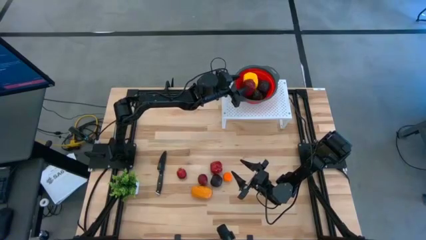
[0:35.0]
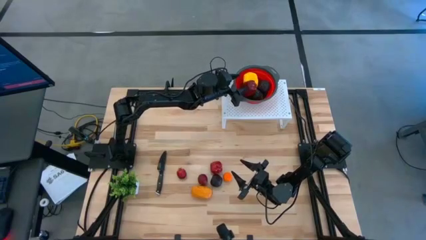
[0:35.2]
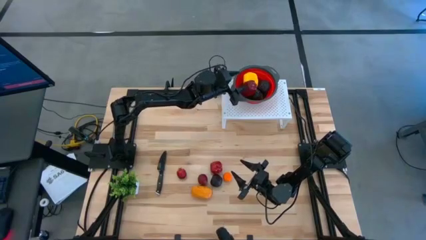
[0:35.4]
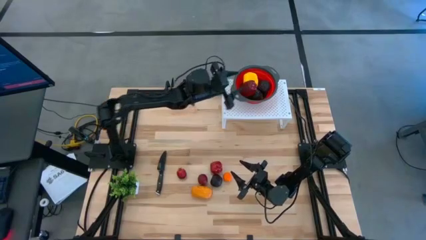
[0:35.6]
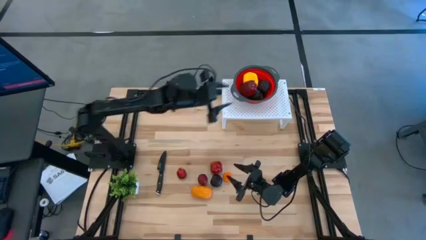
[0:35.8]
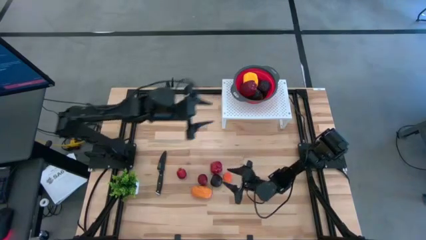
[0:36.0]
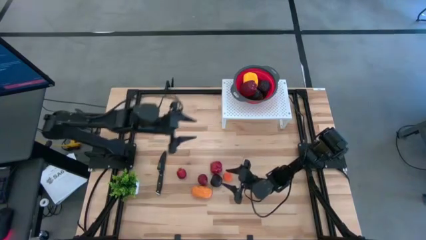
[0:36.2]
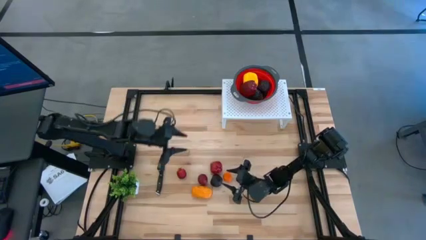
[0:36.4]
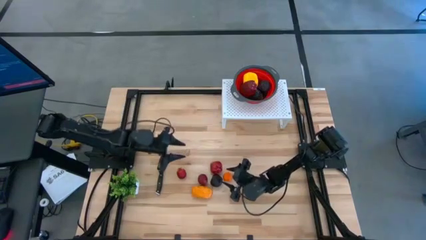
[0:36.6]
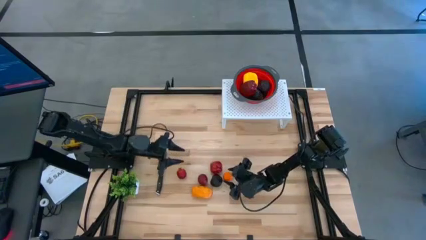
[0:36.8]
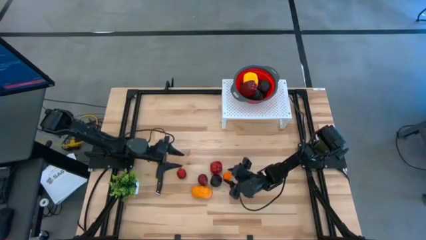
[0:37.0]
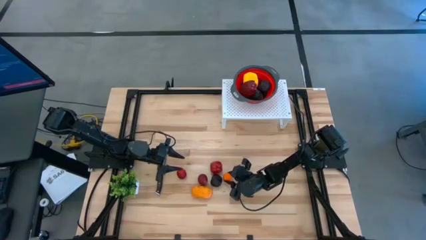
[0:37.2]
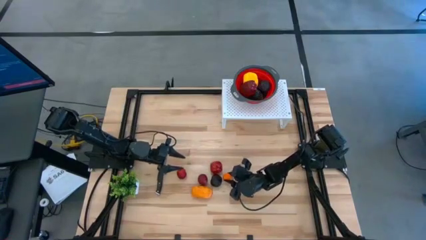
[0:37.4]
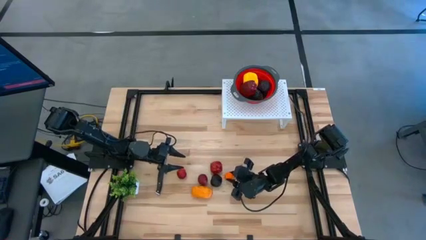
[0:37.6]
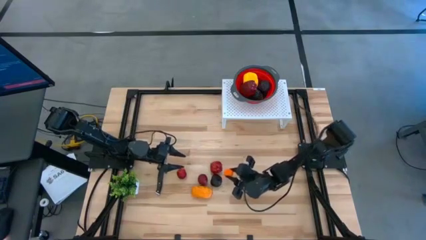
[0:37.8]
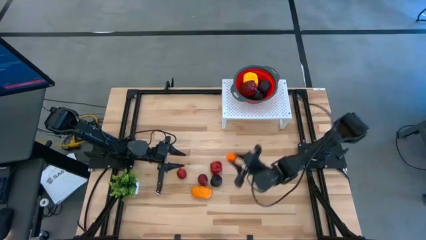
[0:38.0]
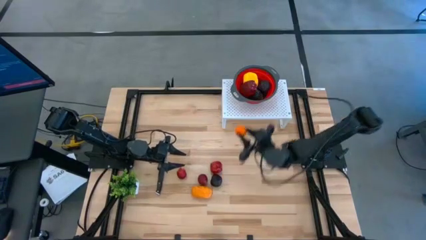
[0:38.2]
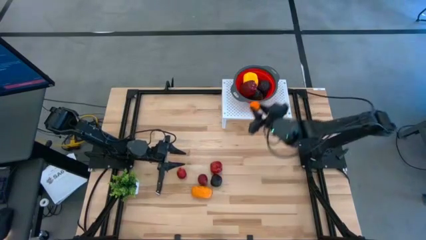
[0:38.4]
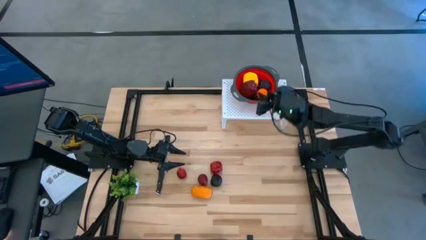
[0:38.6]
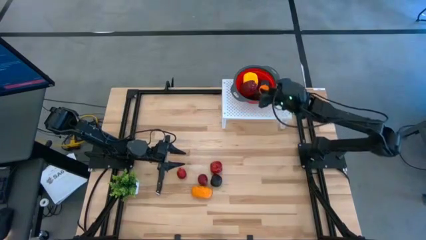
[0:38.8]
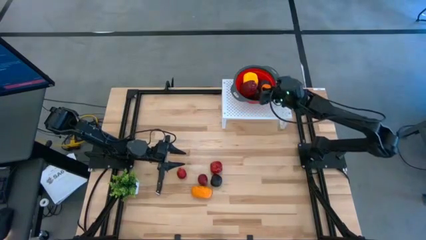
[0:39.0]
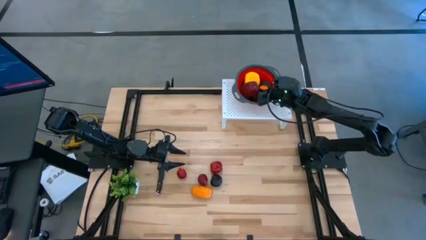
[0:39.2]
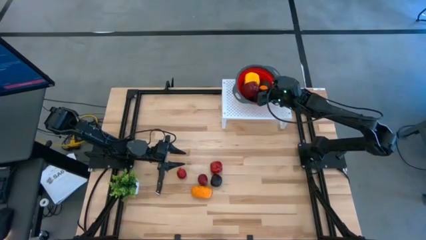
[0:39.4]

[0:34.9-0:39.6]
Task: Pick & Place Fruit
Put the orange into the orange strainer bowl on the shelf

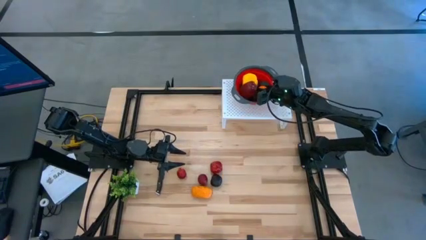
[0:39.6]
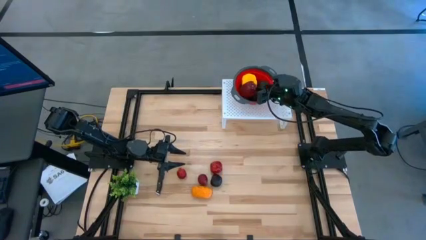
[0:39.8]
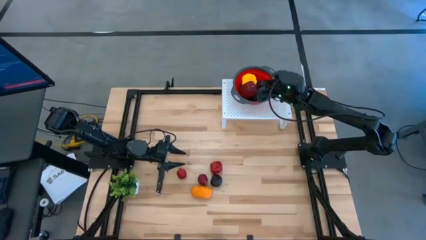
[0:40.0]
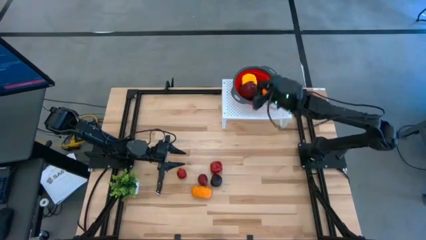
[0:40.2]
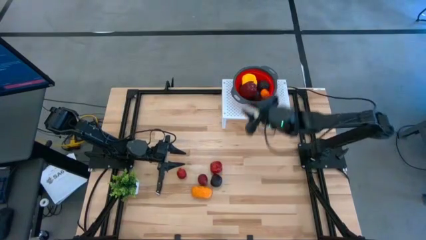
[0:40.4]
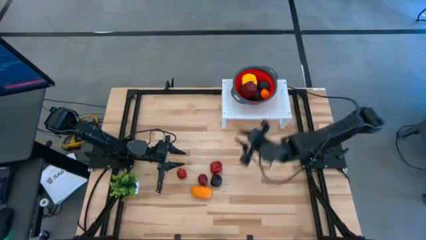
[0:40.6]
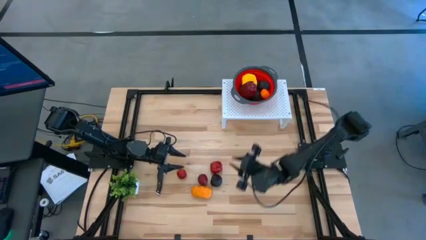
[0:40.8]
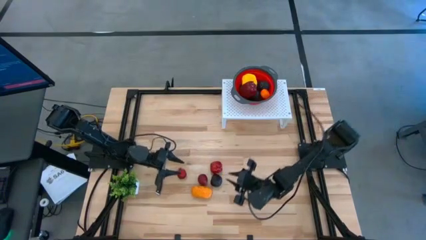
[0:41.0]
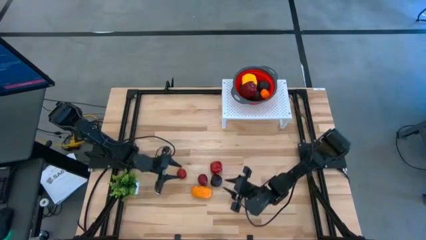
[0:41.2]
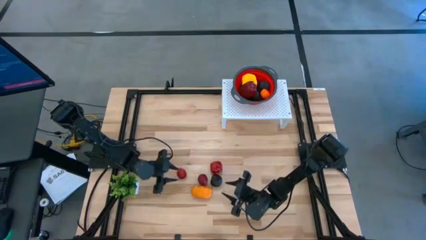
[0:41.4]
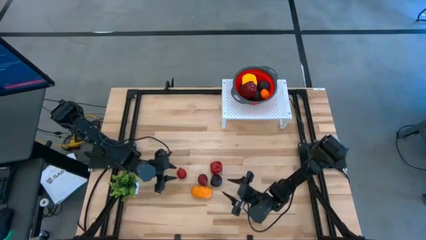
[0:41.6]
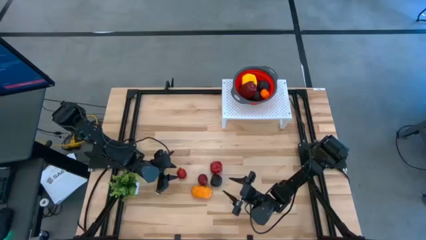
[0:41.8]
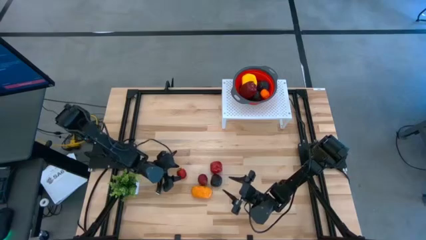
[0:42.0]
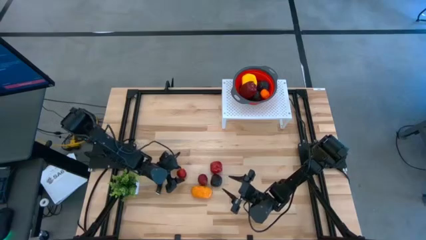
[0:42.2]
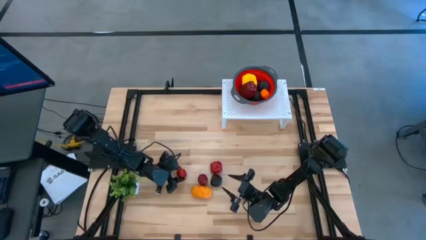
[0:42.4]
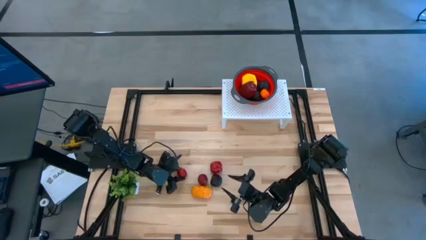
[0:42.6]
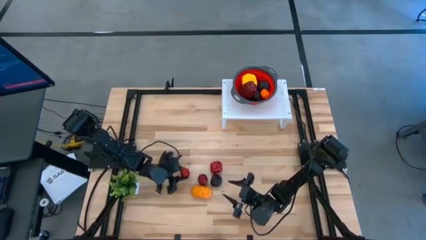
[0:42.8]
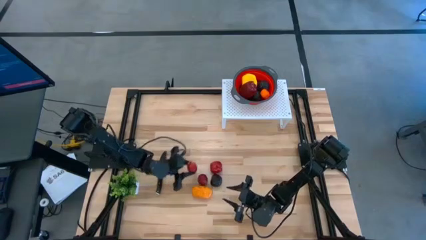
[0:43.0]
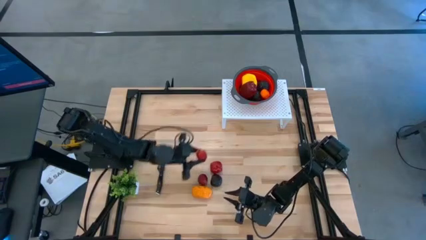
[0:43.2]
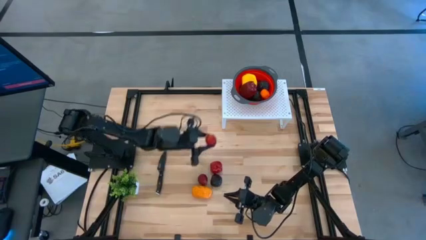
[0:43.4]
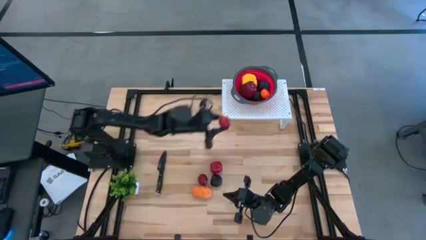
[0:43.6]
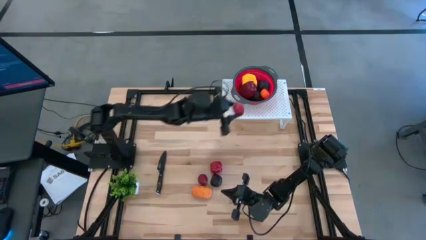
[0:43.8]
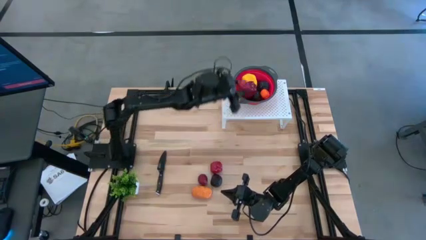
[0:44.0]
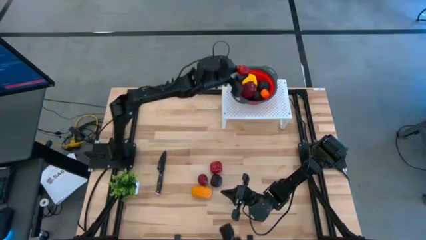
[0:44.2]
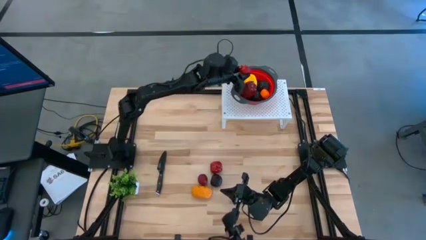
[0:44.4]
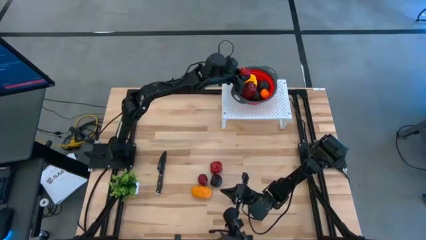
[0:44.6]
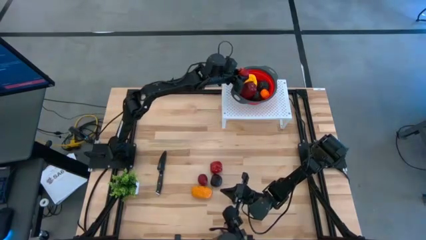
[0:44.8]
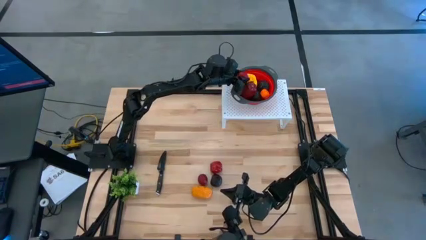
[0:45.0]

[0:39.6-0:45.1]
Put the left red pomegranate into the orange strainer bowl on the shelf

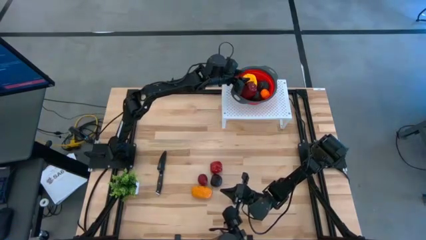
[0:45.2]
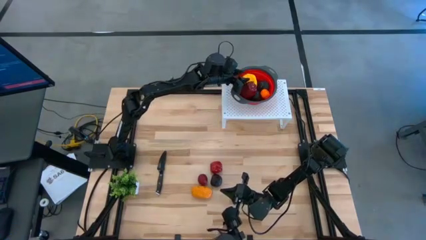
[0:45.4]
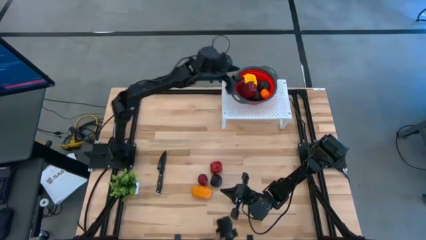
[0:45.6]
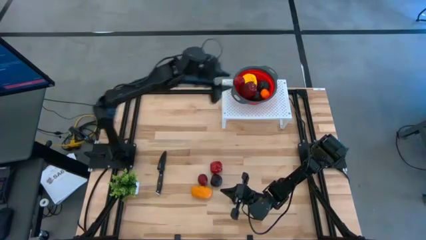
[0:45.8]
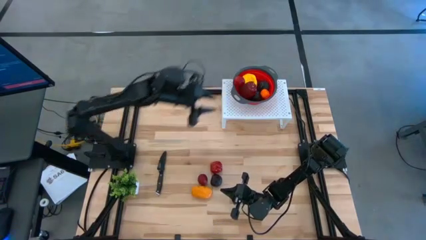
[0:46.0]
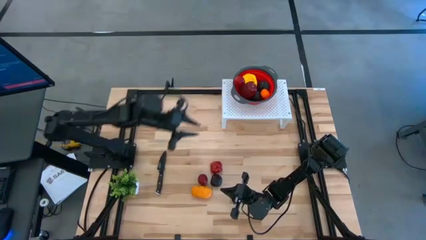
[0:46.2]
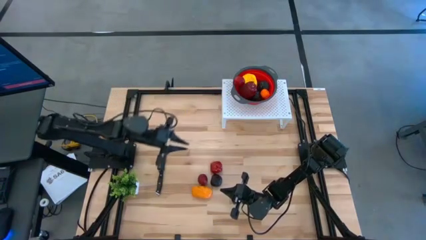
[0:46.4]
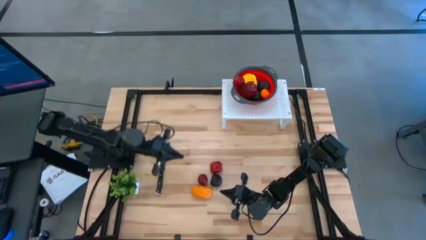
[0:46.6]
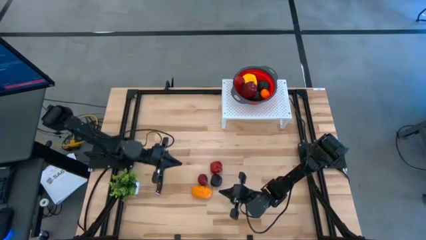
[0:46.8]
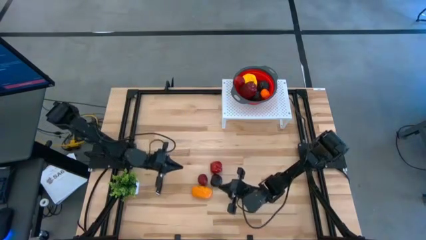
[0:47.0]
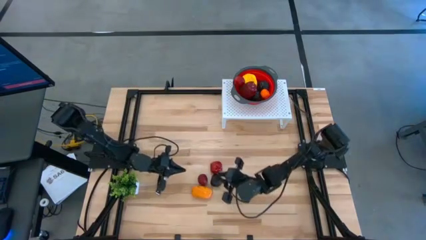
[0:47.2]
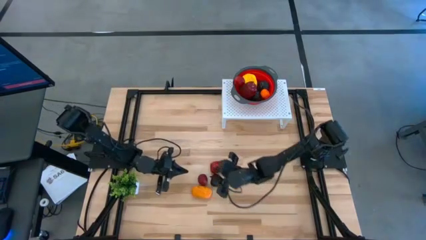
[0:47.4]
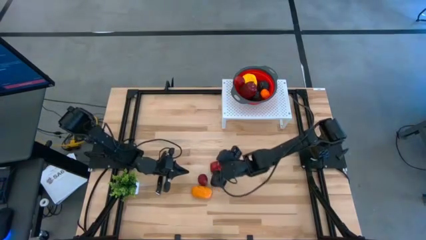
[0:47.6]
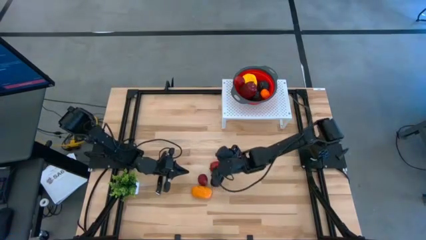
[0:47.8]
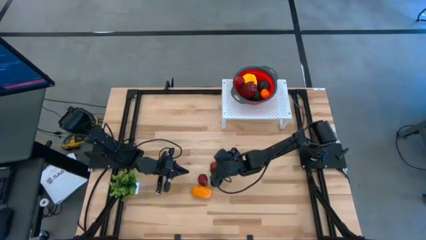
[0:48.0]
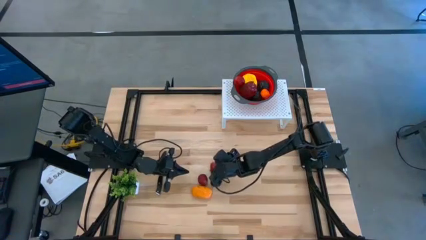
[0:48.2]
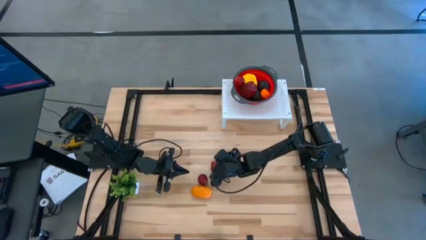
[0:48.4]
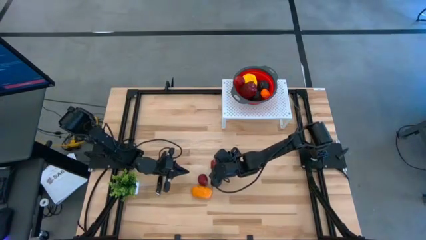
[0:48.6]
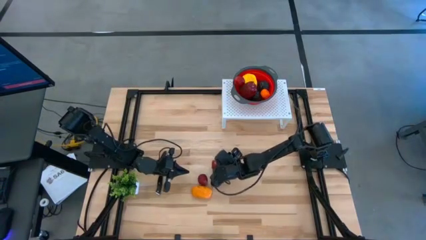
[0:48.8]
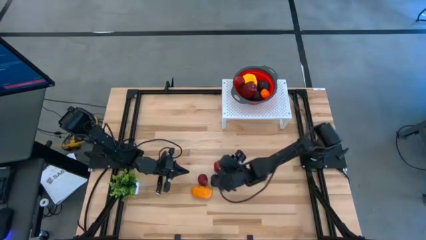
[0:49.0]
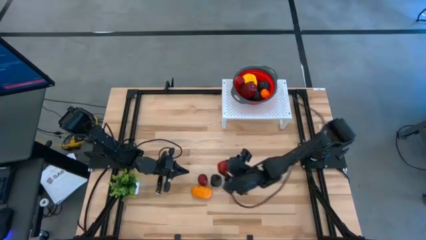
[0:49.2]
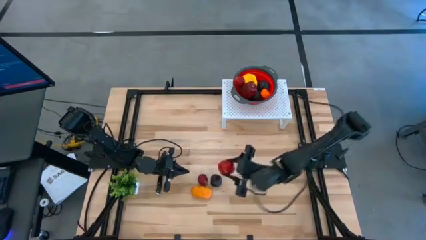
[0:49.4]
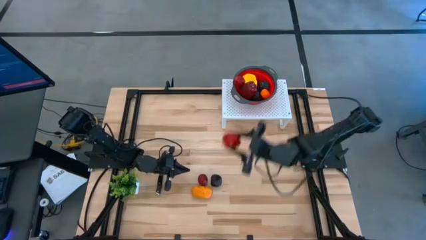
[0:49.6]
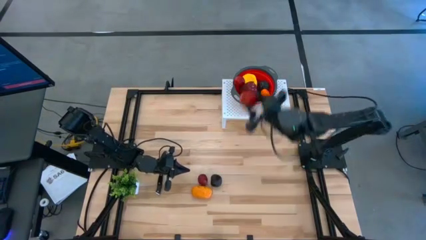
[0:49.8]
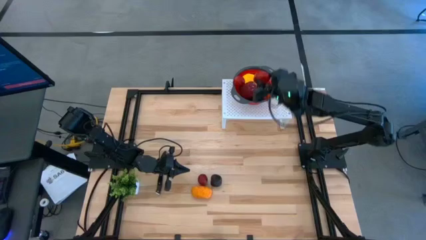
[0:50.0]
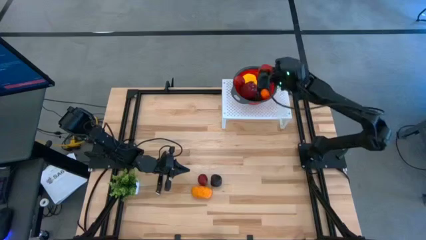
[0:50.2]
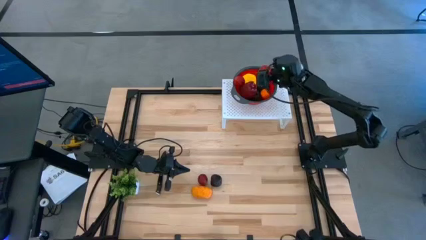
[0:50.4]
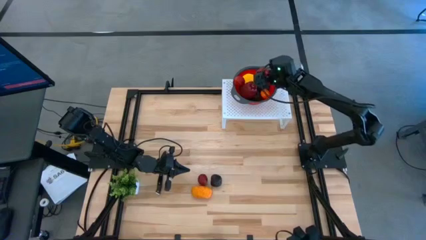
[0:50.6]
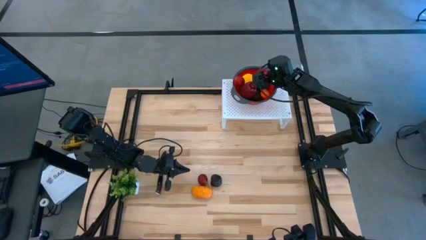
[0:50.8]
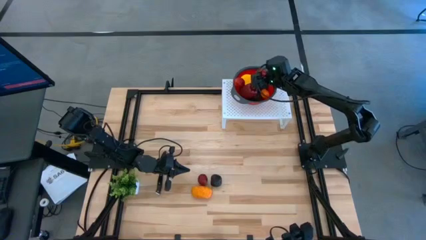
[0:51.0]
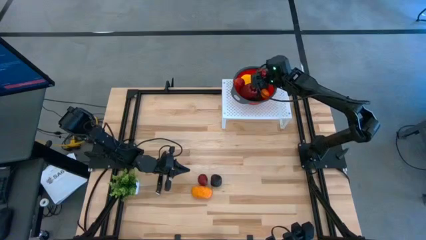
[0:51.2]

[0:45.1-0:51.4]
Put the red apple into the orange strainer bowl on the shelf

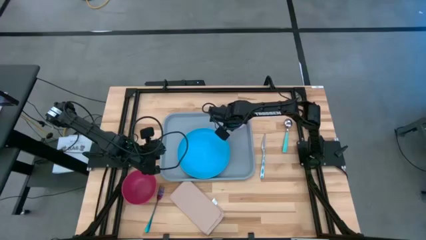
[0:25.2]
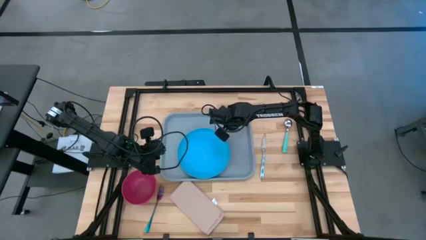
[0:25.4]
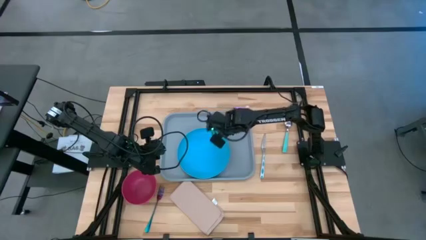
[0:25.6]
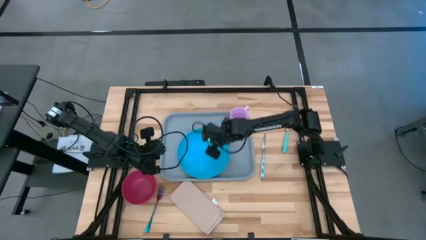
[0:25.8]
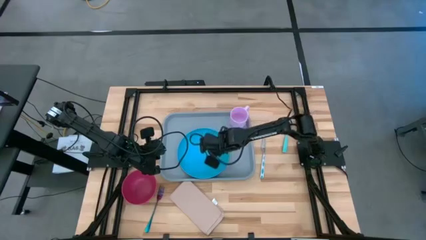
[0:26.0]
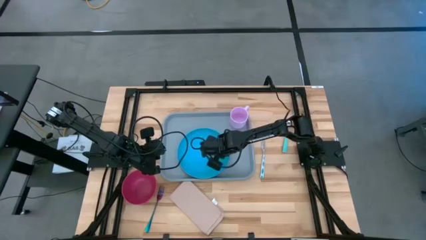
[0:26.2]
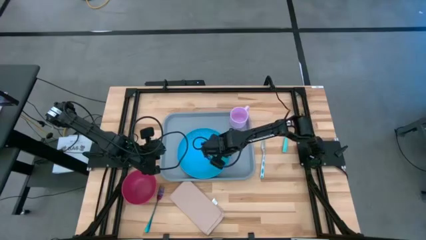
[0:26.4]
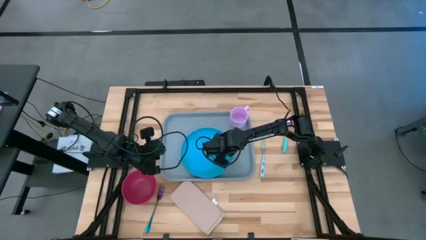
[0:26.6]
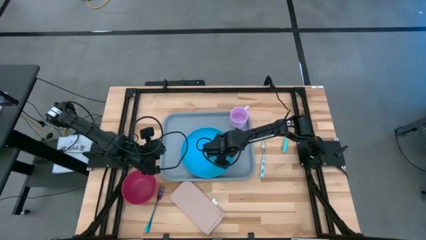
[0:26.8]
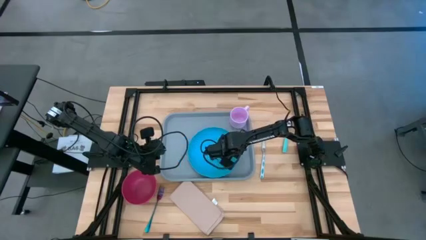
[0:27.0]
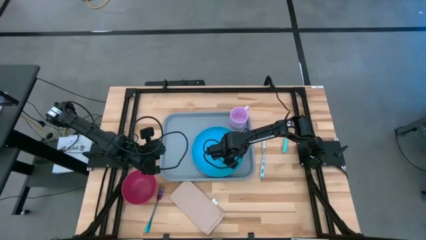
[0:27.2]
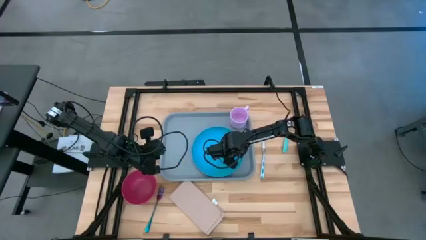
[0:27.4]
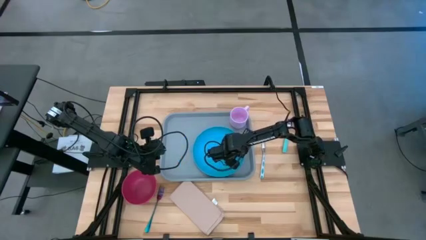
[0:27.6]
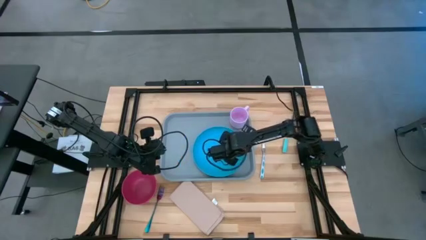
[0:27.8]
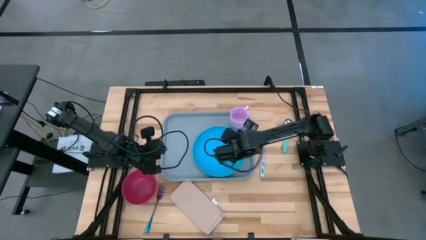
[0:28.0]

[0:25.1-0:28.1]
Task: Set up tray
Adjust the blue plate to the bottom right side of the tray
